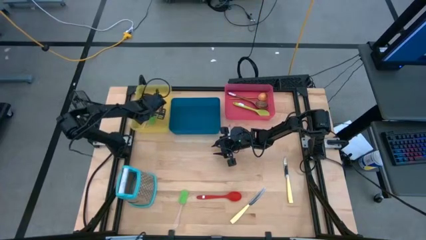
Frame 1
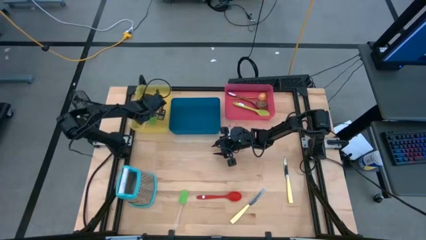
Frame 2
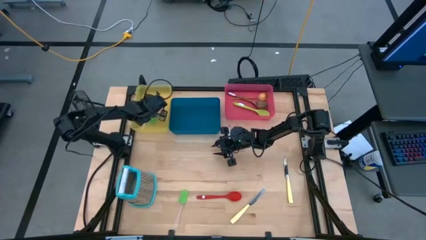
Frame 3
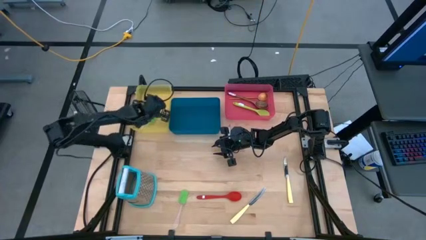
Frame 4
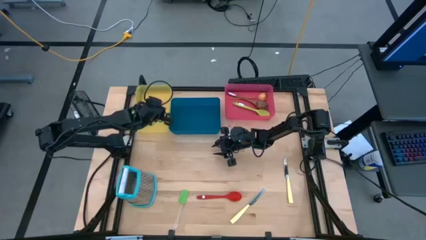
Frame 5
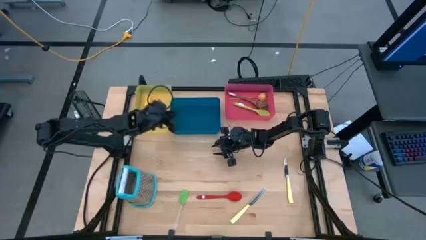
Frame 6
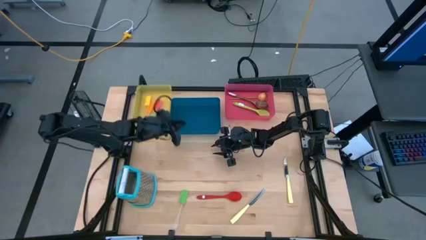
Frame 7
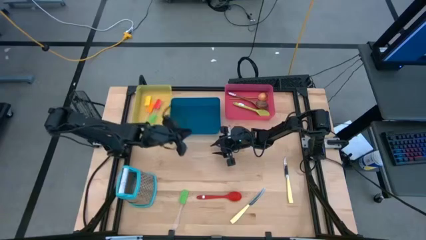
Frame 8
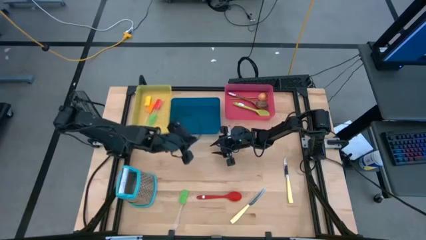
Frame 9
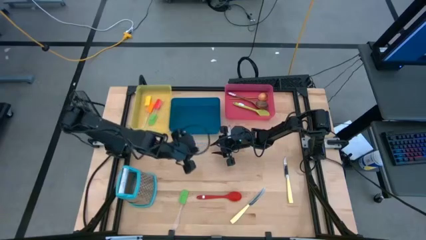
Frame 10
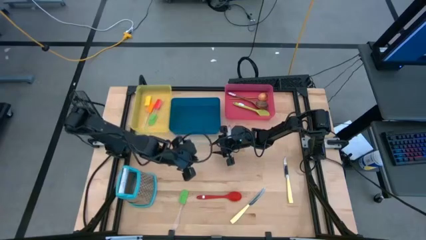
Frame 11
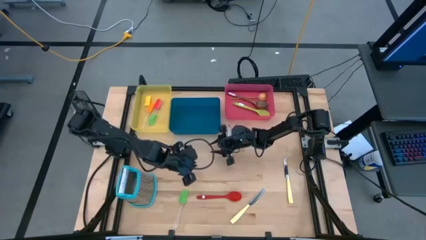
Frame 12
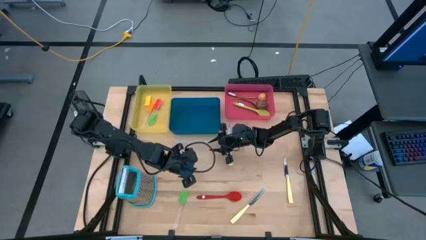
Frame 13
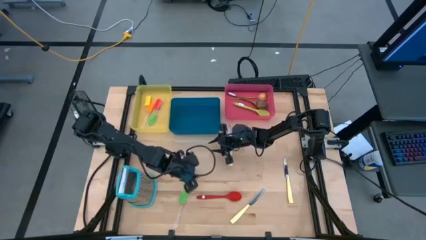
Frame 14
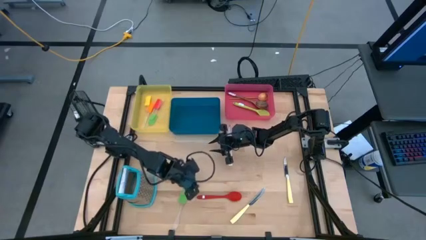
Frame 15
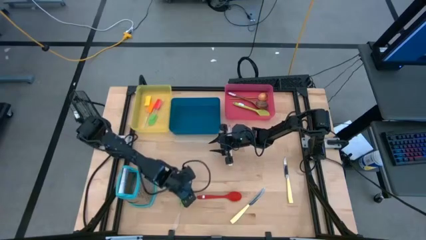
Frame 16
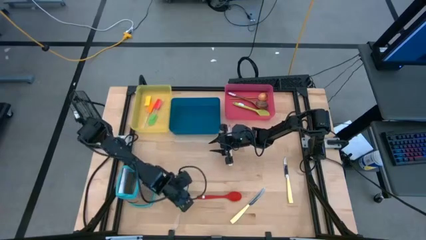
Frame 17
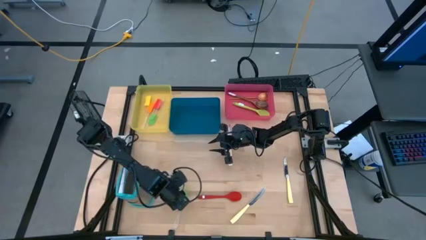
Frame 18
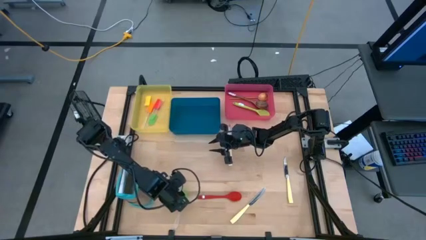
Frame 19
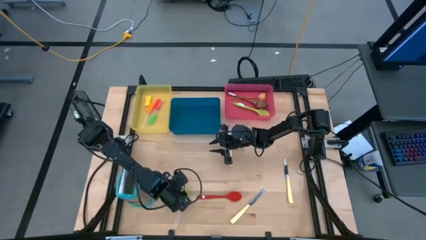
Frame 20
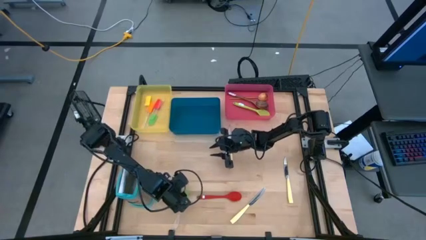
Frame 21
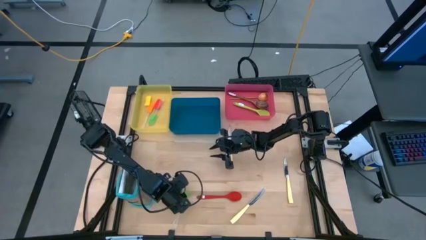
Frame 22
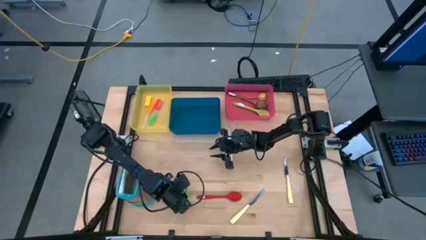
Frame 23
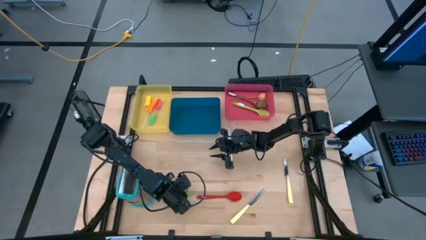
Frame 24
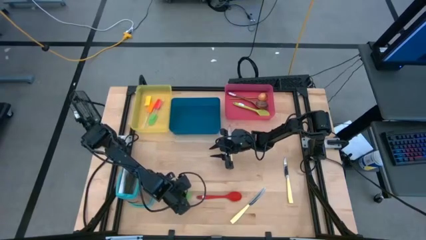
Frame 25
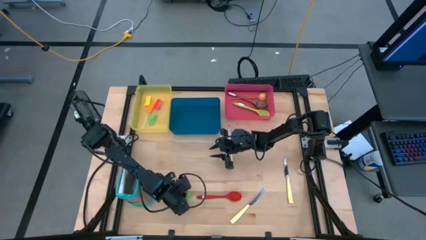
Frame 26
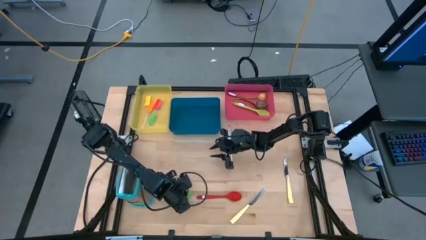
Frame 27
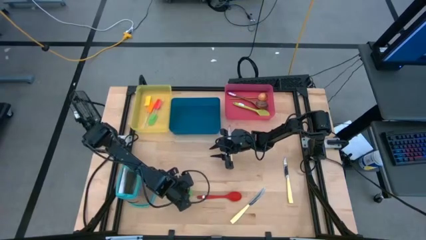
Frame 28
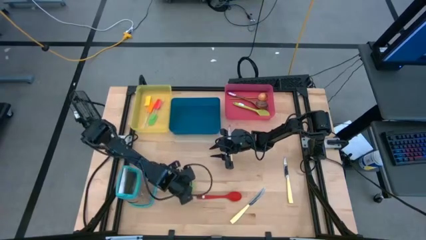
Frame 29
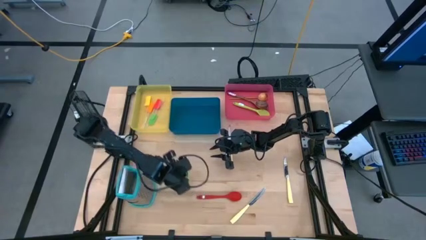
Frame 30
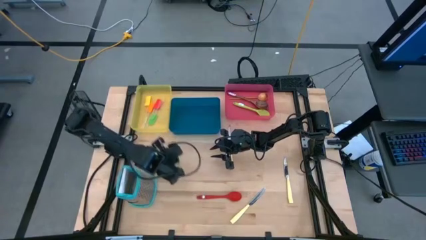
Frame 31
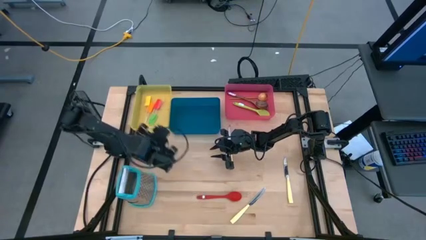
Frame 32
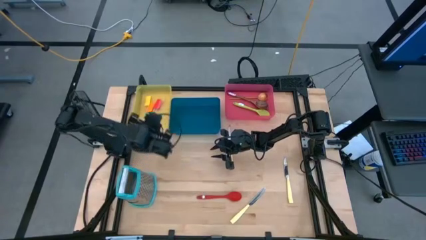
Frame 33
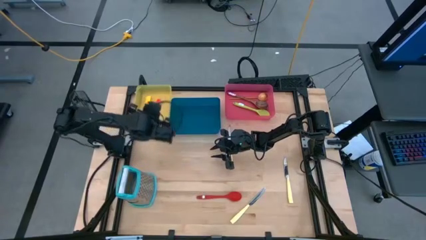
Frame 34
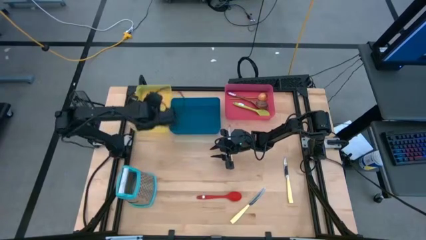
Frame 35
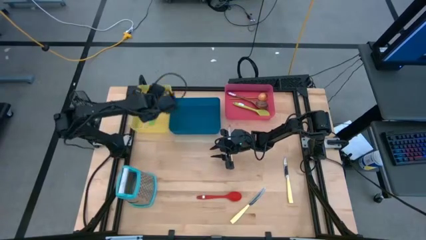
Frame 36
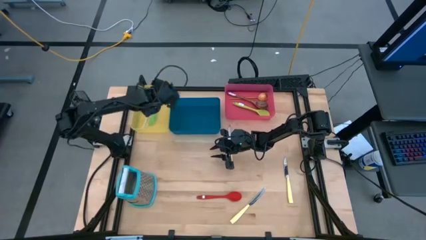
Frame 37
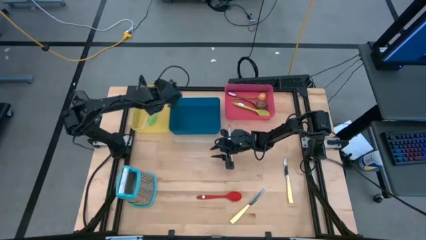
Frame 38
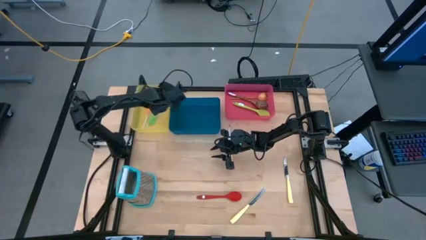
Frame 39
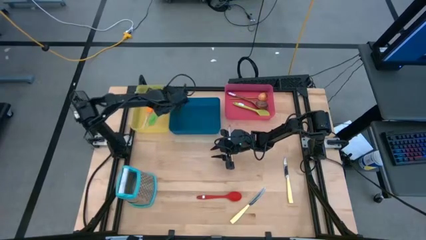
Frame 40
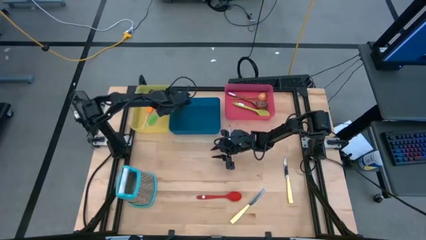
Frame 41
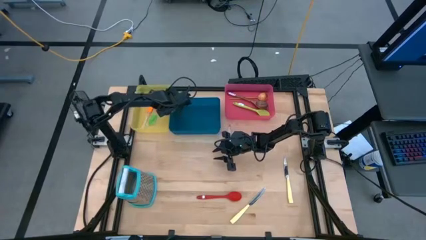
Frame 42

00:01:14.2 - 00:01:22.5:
Task: Pick & Place Kitchen Items
Put the green spatula into the yellow bin

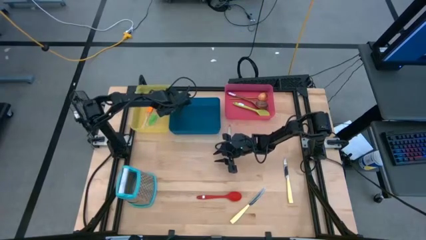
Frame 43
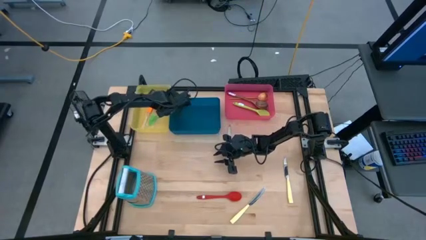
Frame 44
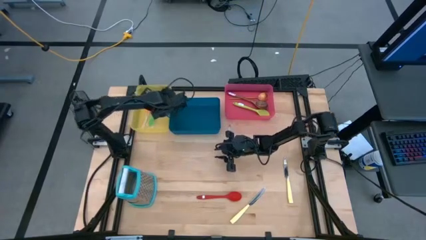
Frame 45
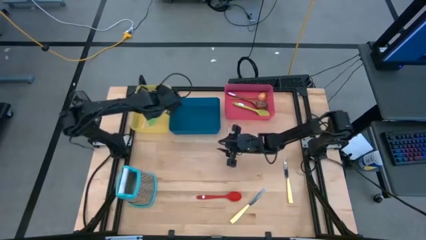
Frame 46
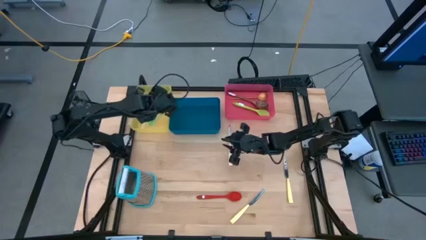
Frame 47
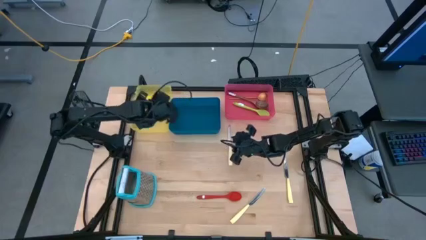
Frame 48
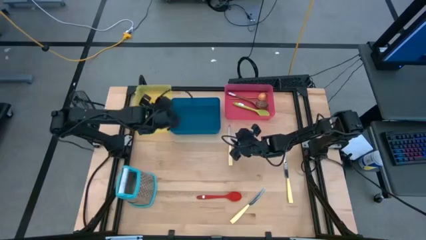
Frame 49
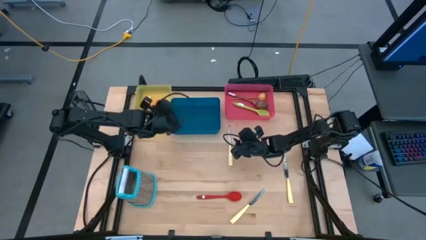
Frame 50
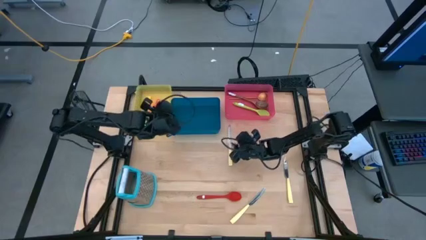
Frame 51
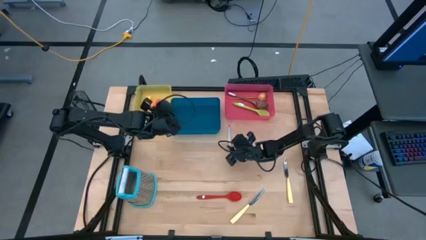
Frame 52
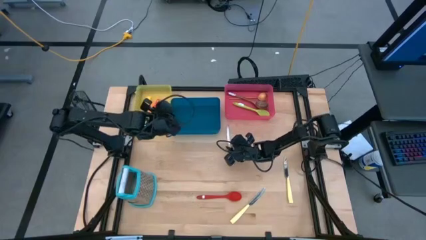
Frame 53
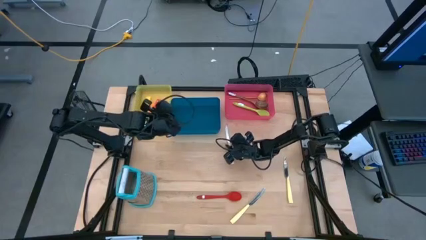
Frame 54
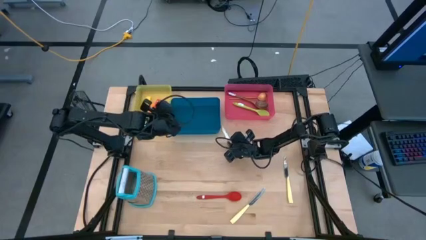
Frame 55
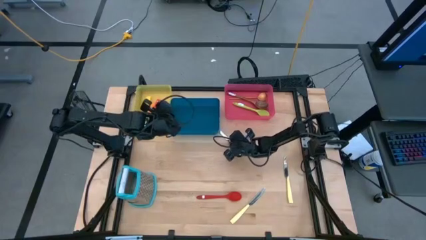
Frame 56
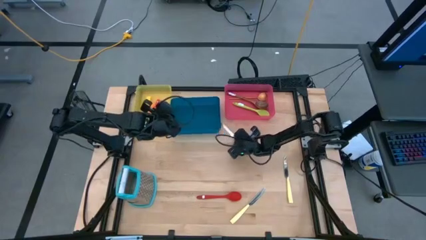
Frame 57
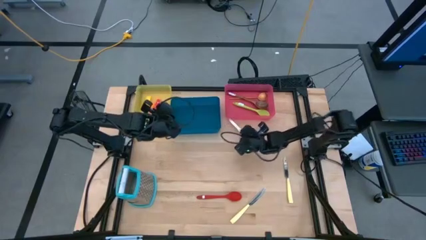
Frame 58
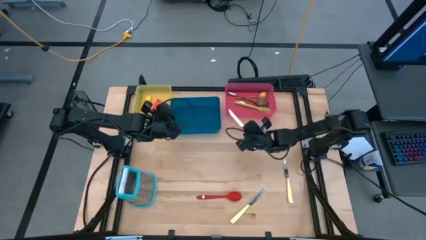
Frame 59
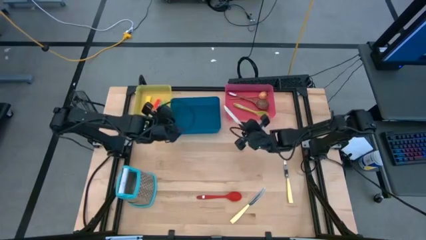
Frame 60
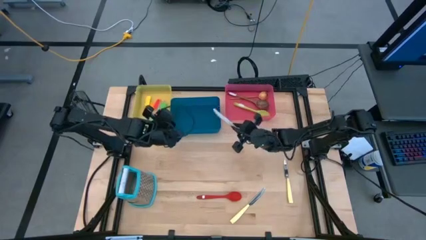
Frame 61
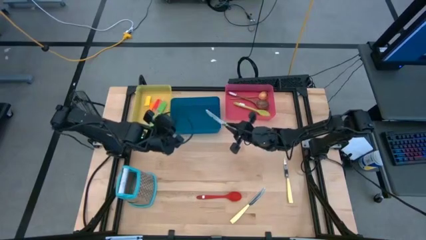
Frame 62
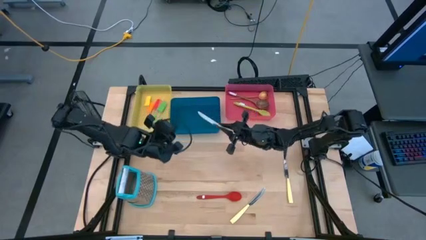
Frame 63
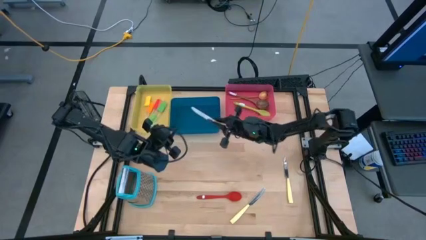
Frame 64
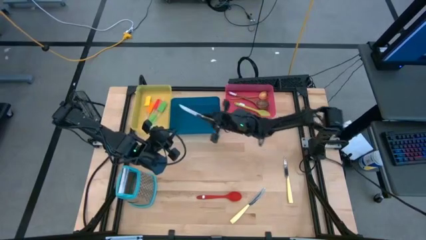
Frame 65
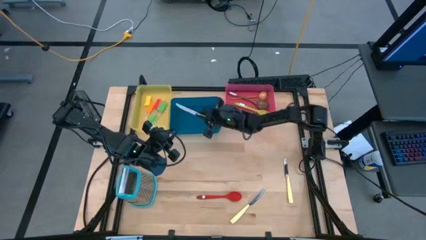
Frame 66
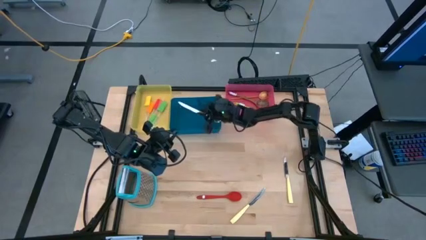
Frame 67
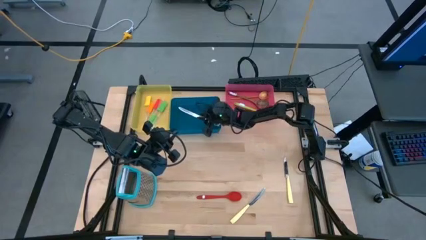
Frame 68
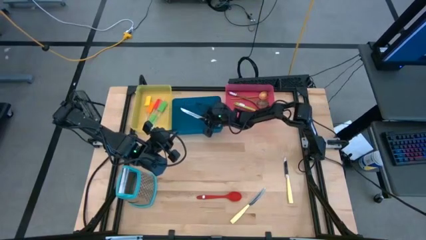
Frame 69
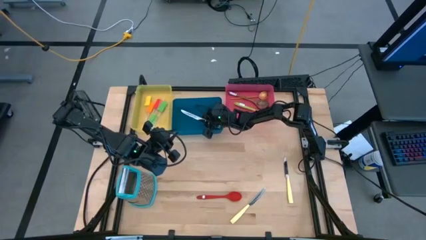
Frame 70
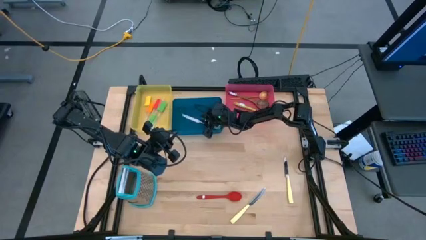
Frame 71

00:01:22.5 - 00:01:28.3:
Put the top light yellow knife into the blue bin

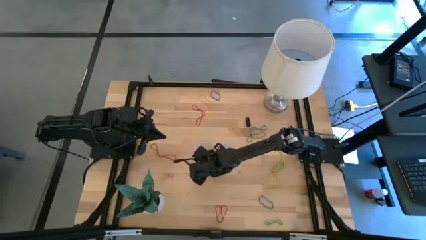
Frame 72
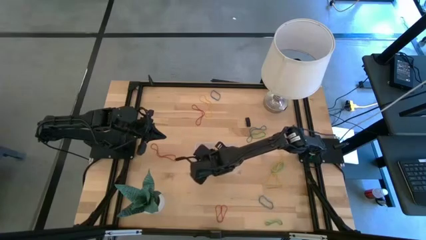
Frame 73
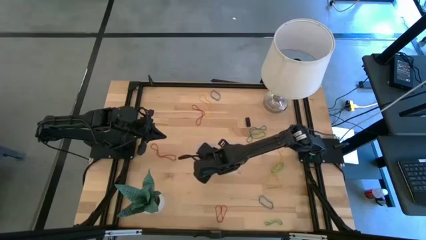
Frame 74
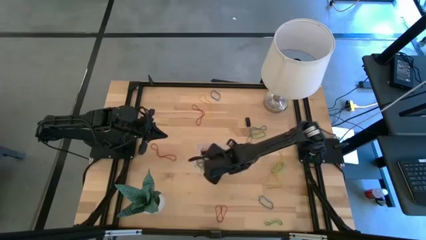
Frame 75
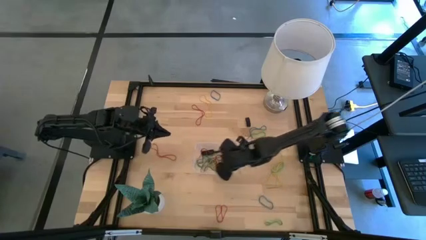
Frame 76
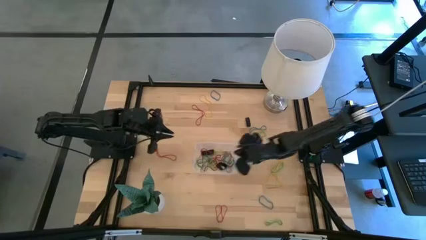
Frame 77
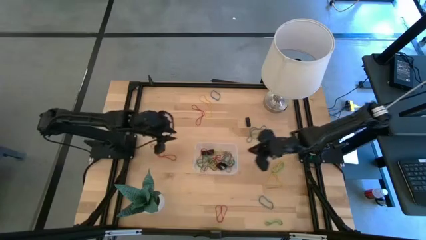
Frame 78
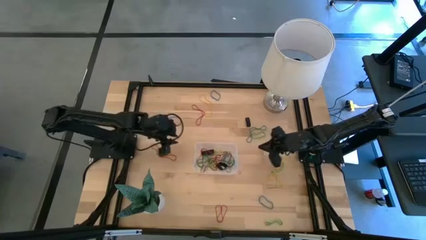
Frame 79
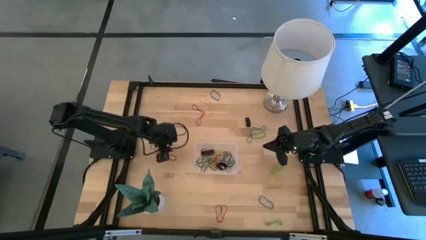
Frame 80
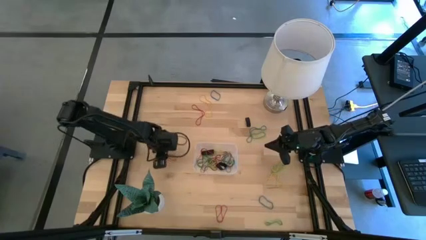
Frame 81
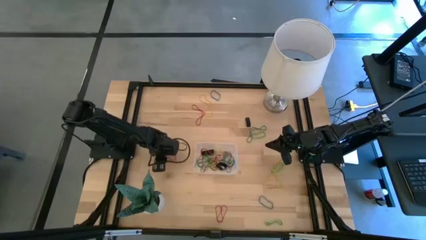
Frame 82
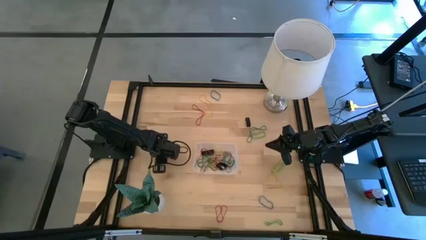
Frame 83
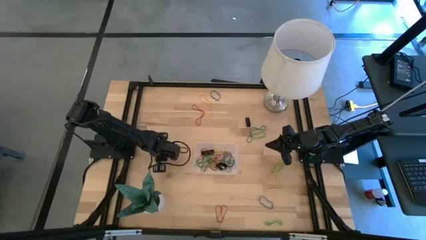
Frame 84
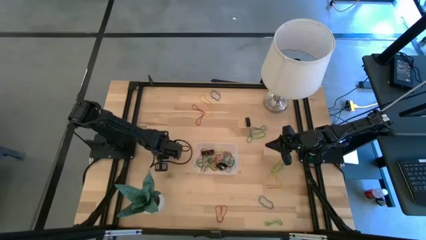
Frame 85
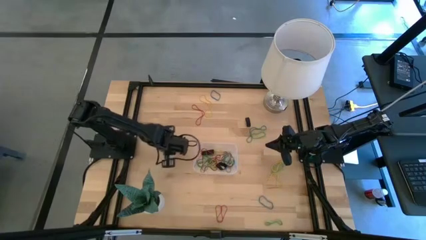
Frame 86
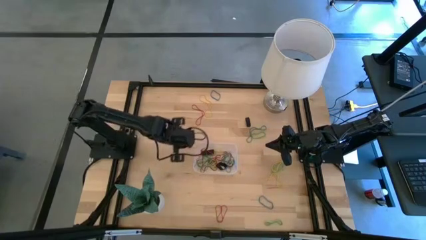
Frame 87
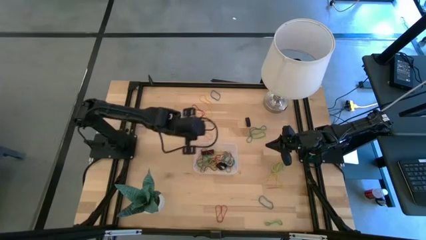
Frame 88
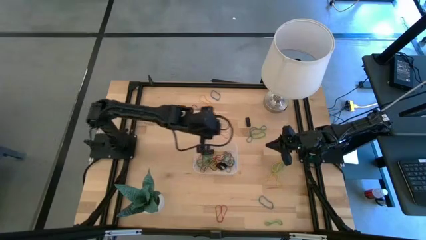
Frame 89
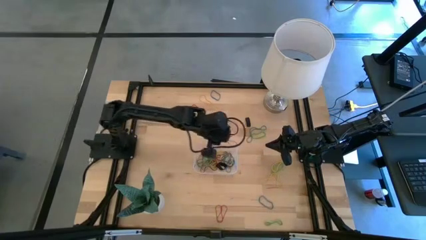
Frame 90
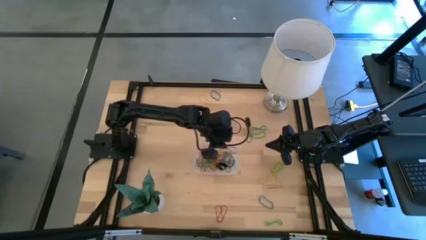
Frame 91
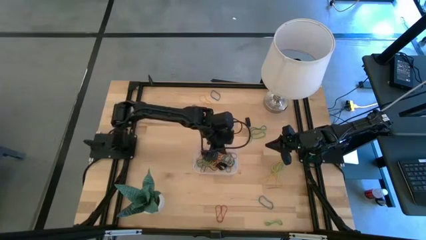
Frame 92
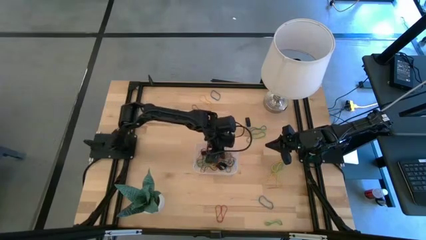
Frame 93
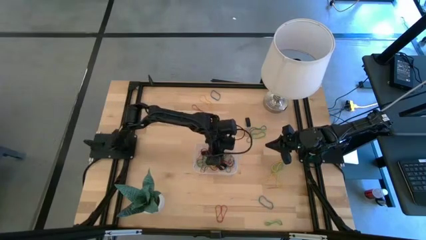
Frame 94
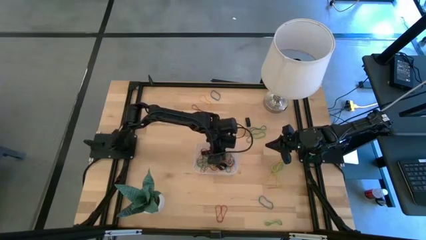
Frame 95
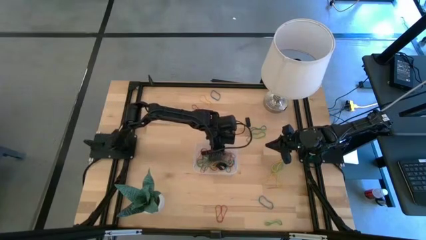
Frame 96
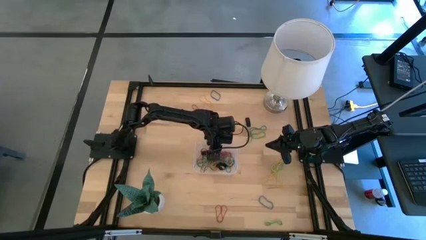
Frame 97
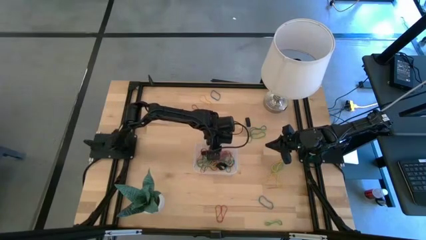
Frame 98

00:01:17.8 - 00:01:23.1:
Task: Pick and place rubber bands into bin
Put the red rubber band into the transparent bin
